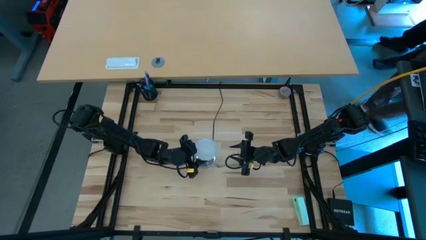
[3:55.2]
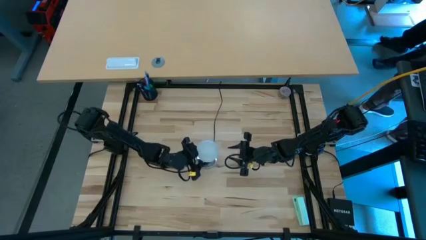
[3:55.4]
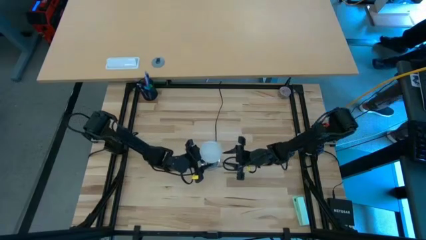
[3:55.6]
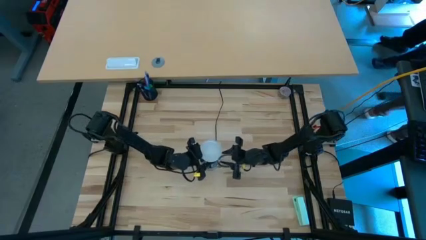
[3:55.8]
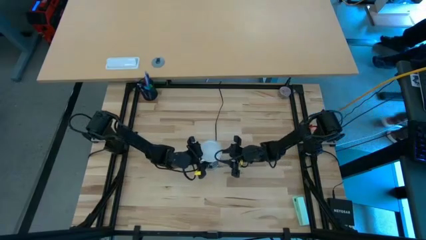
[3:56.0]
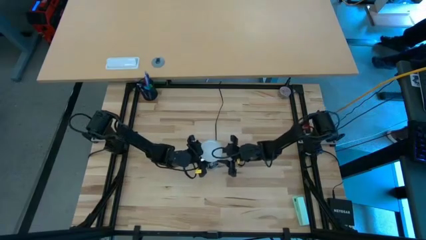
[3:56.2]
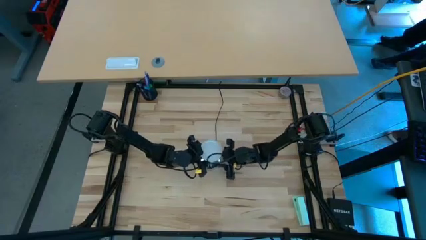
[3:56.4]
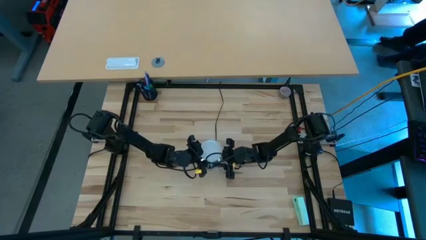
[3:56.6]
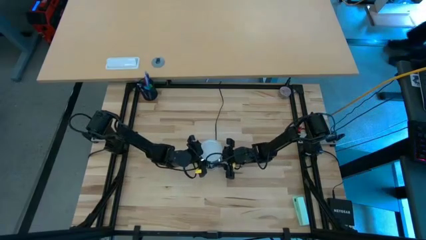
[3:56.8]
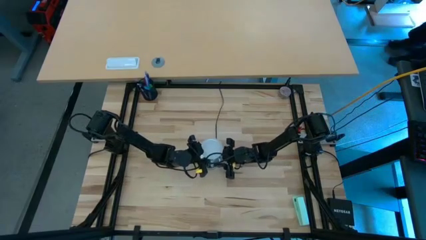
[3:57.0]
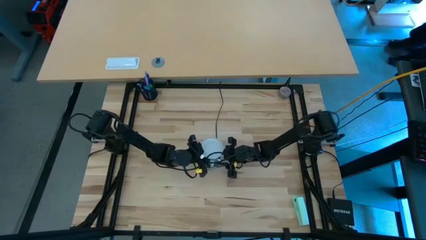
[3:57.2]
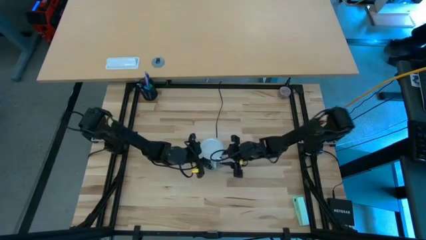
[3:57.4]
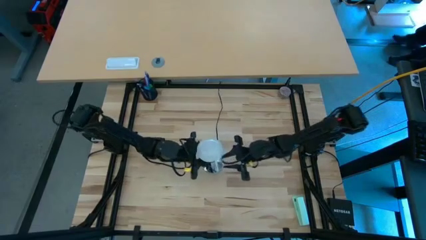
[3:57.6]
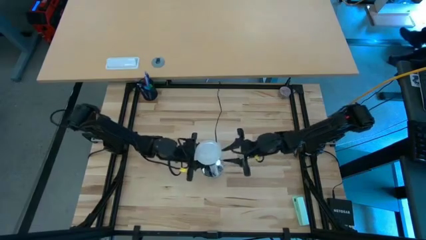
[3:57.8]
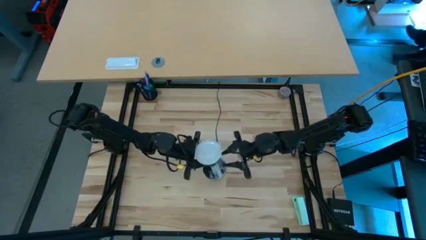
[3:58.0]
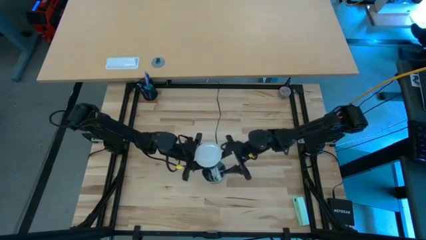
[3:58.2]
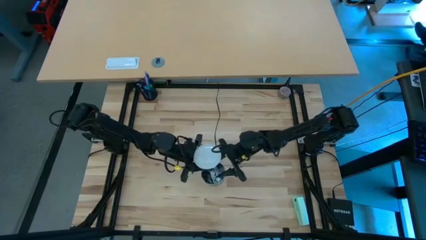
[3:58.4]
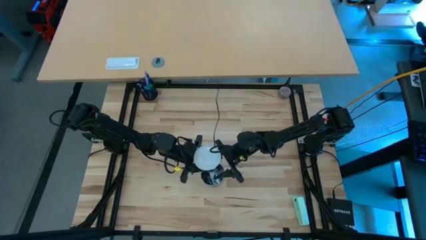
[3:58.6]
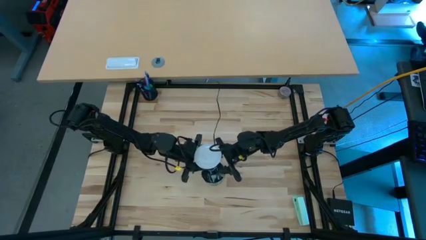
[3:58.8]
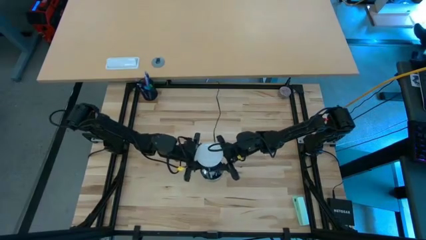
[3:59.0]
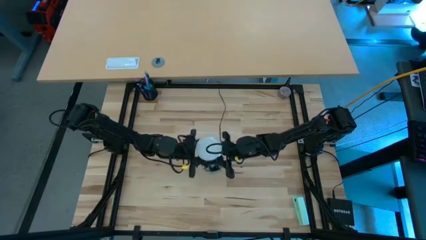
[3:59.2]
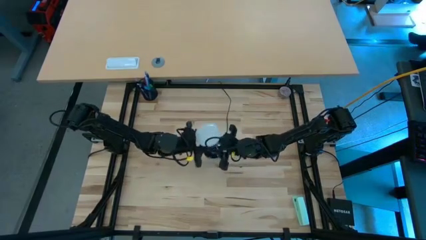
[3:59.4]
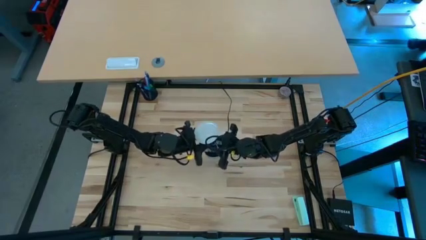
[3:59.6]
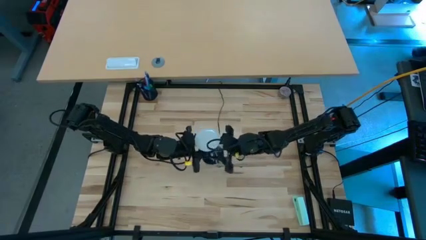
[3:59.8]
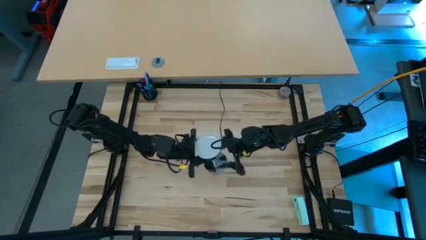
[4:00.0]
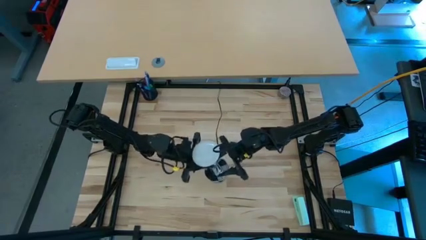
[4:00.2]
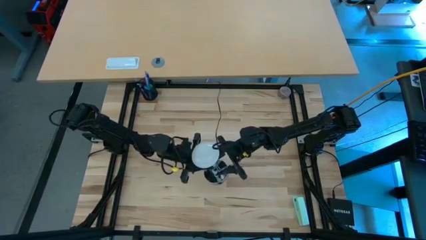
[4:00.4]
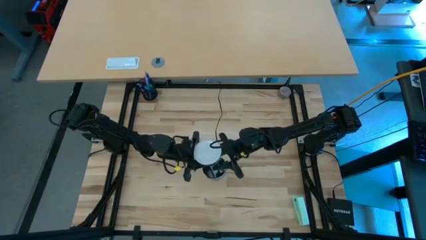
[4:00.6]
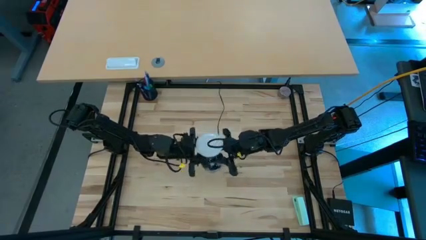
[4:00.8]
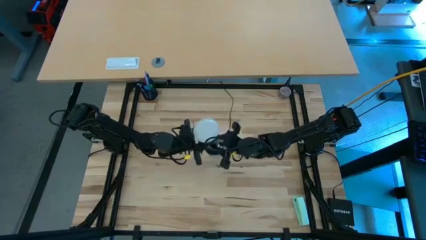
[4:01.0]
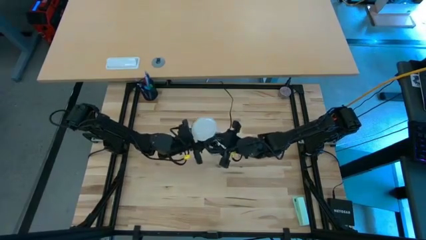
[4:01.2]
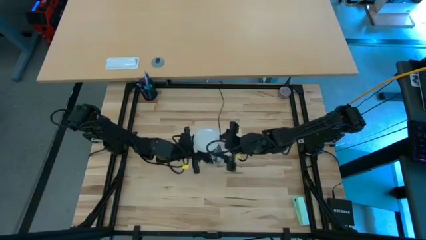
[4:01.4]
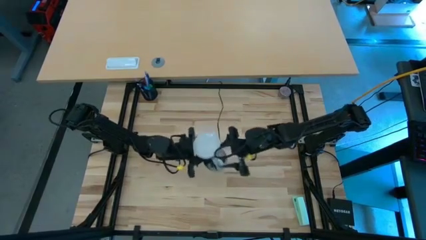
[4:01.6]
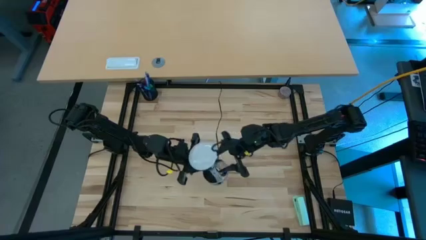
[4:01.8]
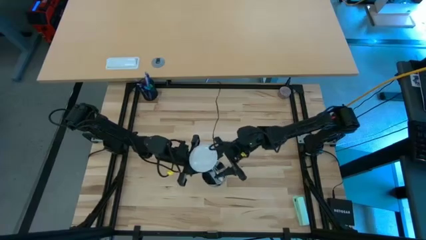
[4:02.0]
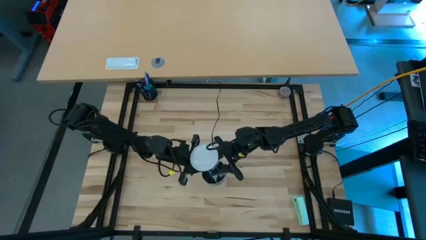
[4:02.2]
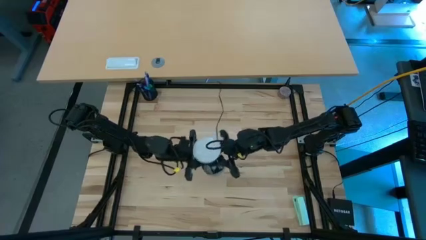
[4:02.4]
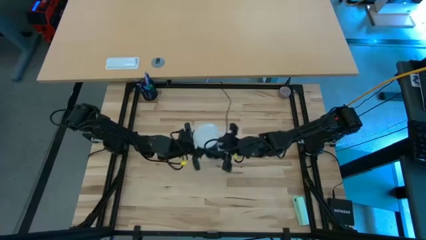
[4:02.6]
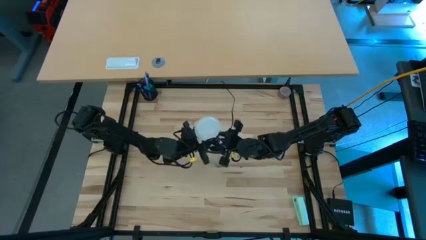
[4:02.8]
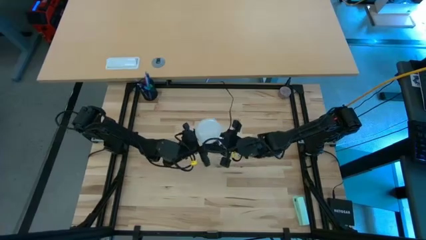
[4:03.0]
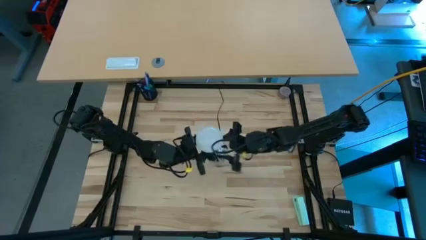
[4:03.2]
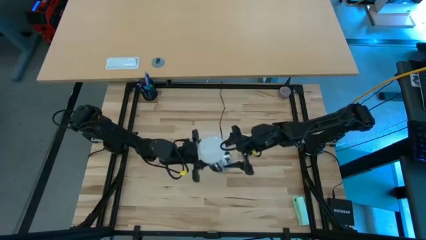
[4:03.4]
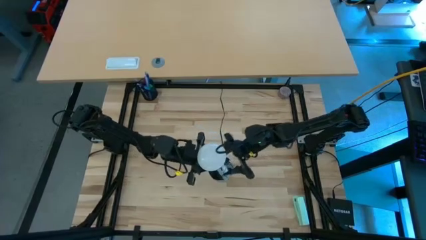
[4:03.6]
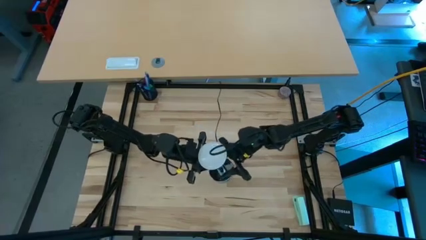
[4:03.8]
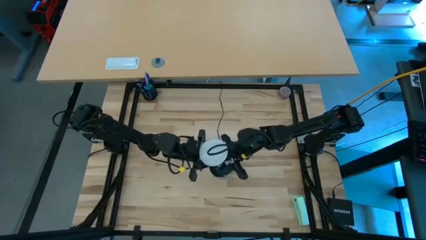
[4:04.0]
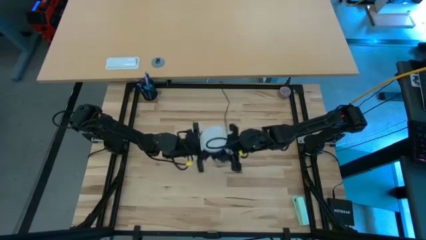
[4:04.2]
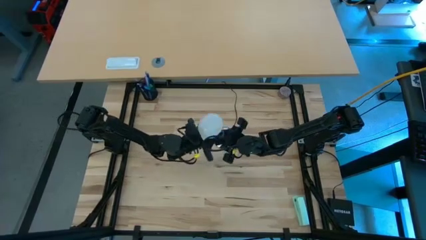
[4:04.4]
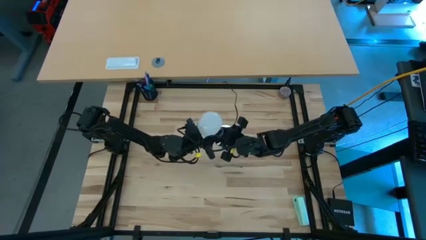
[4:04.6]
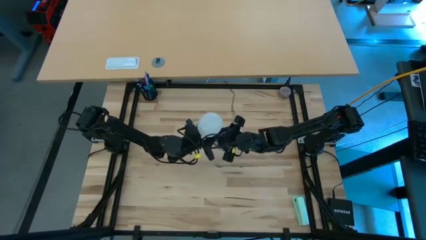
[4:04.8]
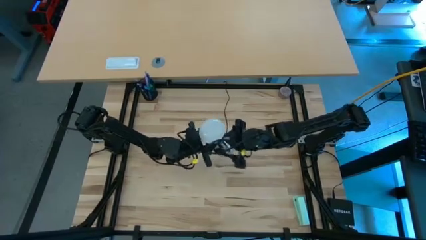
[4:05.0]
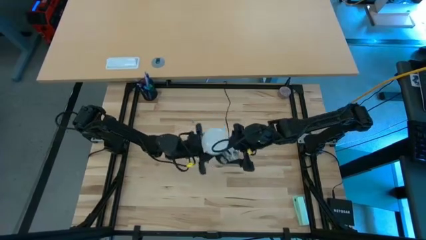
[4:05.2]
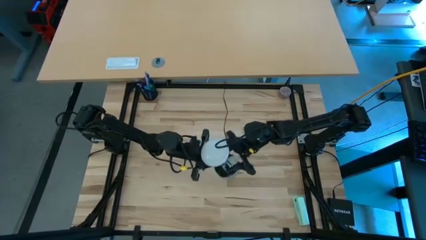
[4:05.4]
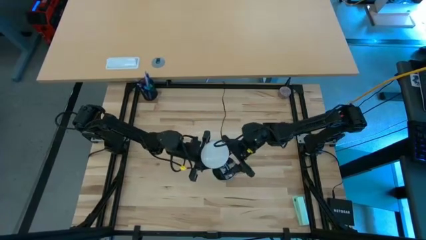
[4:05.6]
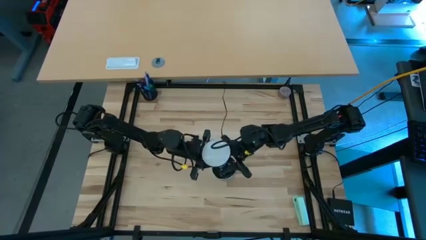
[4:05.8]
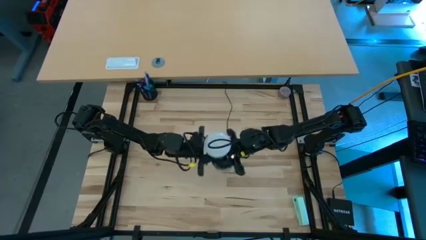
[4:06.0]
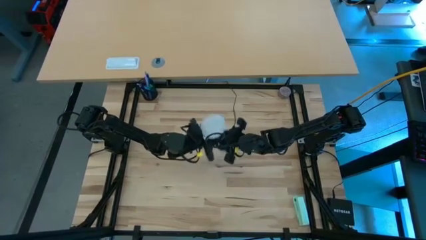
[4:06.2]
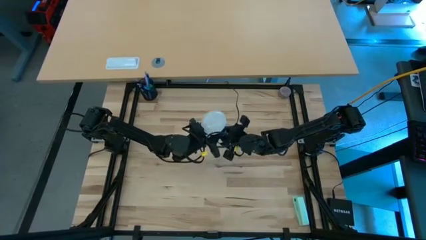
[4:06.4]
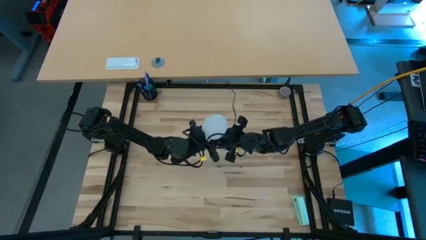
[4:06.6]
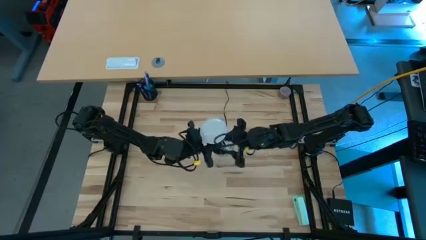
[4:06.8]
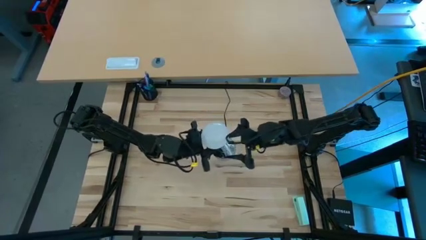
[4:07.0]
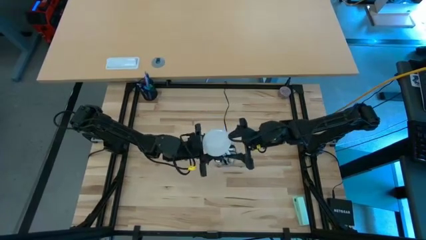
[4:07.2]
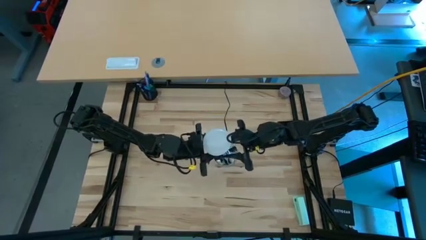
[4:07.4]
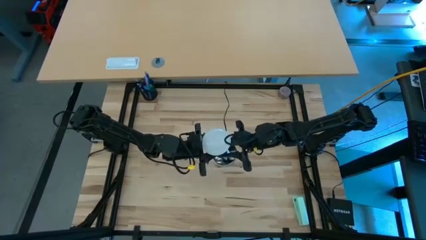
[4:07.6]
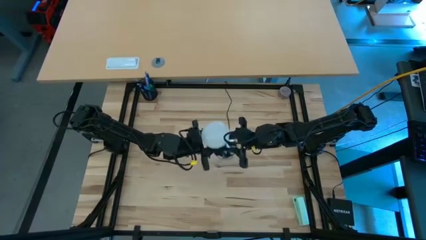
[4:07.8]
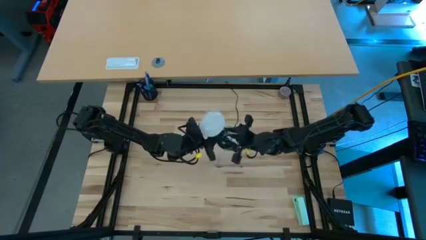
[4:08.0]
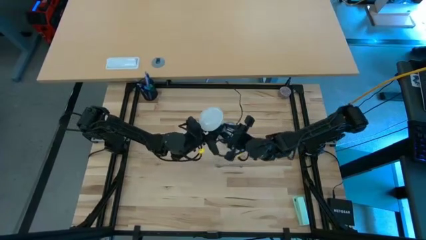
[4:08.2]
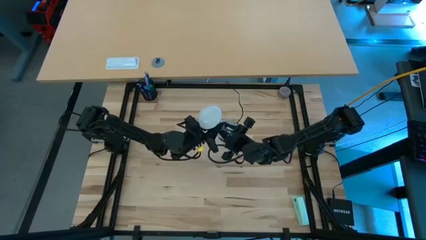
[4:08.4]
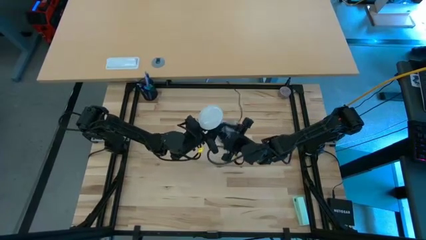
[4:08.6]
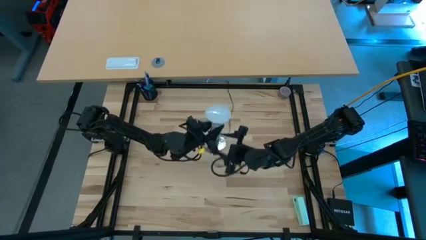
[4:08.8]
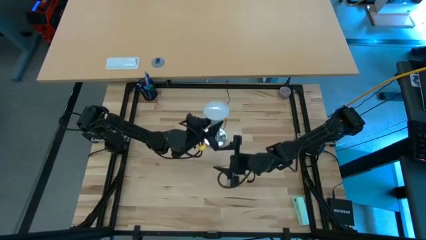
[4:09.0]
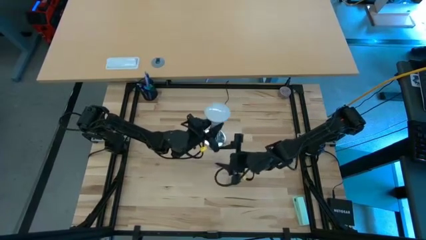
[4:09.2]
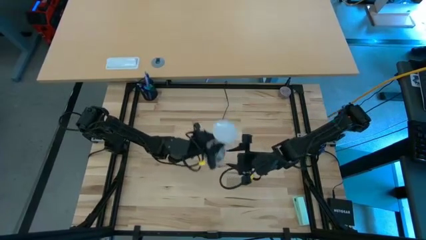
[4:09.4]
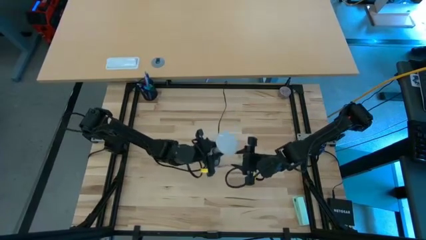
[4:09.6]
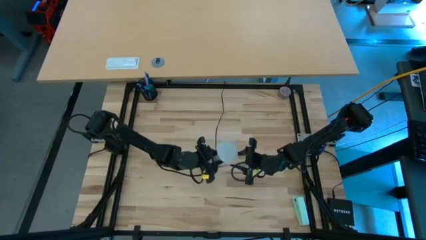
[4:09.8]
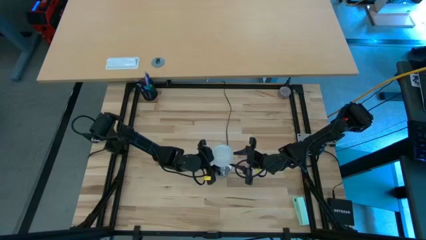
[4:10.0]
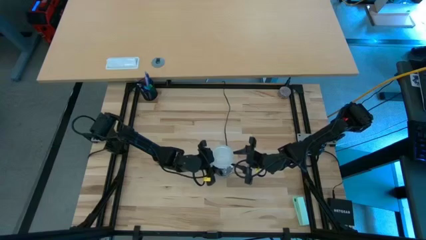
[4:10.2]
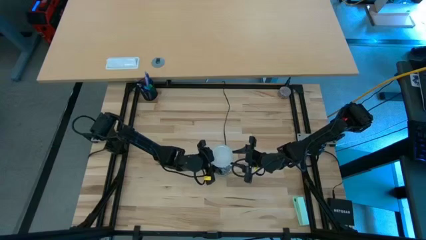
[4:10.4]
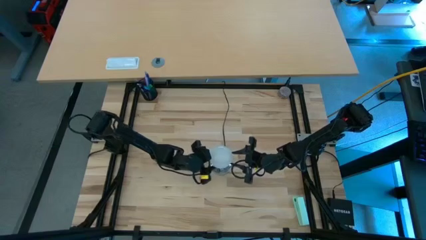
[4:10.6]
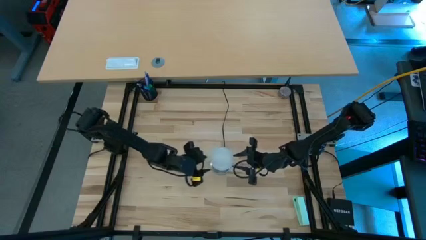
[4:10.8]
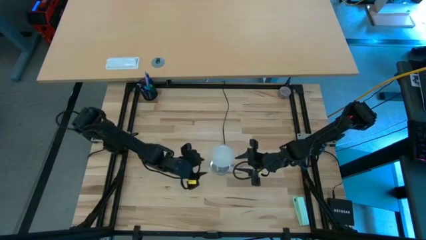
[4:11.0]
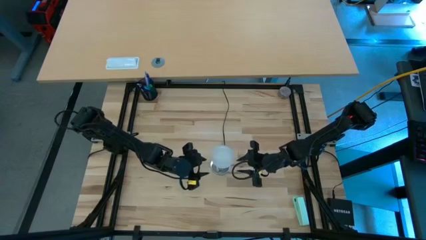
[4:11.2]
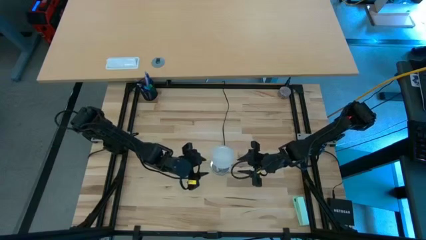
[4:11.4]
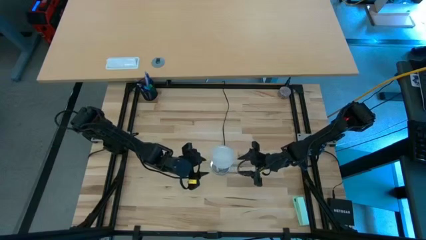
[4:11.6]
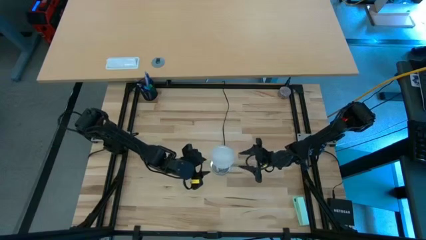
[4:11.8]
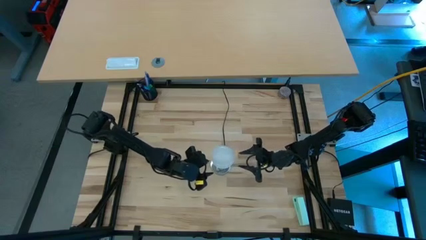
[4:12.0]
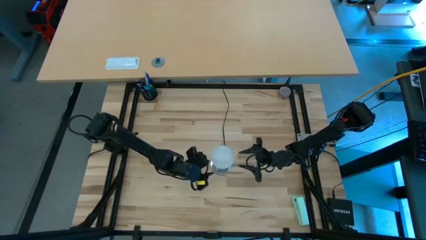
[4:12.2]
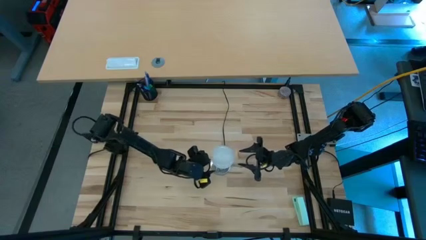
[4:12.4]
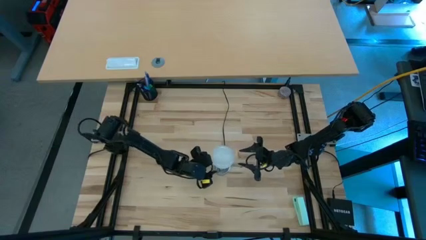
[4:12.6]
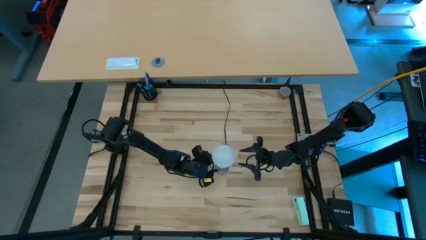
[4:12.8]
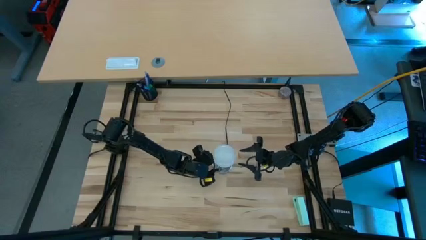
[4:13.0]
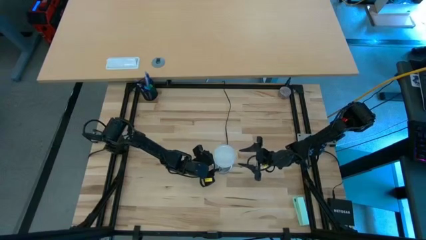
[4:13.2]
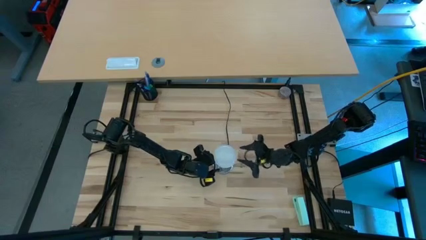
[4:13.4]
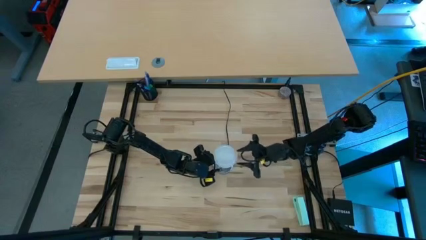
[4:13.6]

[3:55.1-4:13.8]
Task: Screw lightbulb
Remove the lightbulb from the lamp
